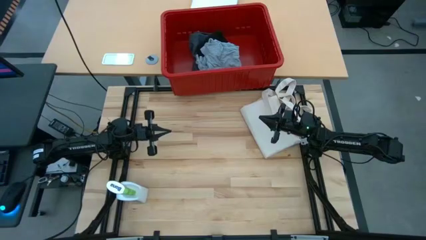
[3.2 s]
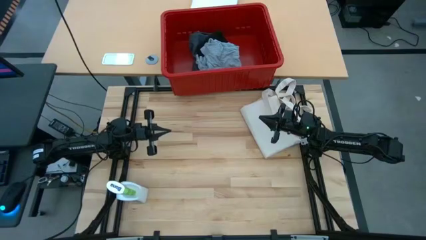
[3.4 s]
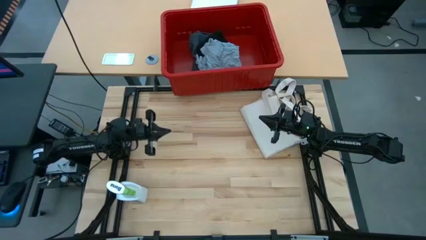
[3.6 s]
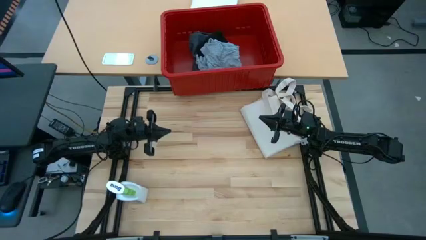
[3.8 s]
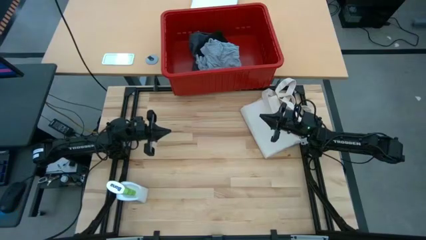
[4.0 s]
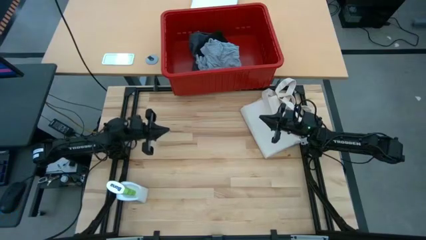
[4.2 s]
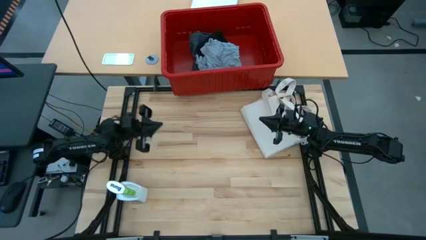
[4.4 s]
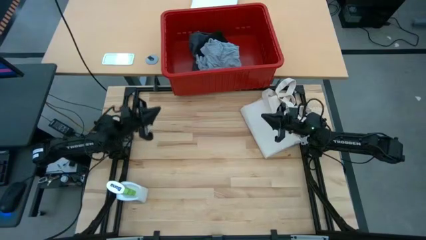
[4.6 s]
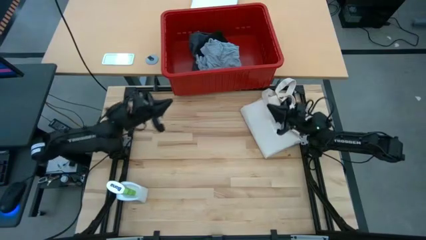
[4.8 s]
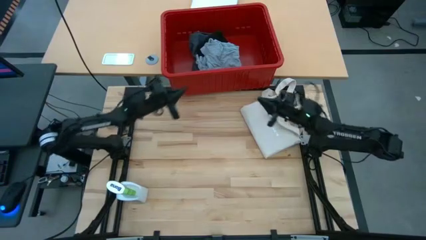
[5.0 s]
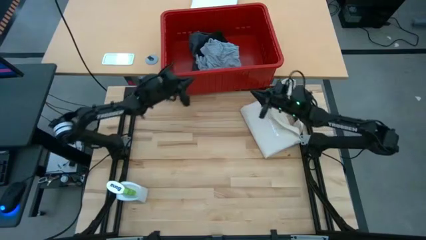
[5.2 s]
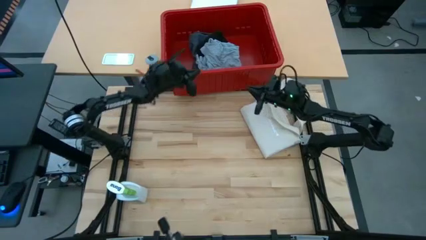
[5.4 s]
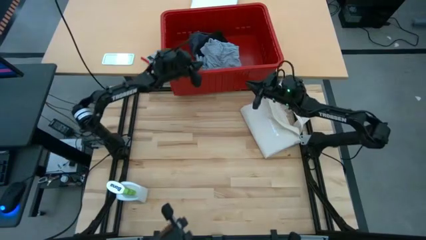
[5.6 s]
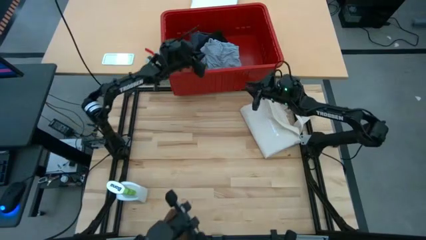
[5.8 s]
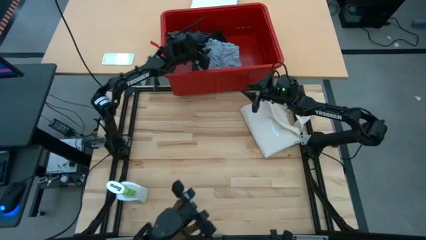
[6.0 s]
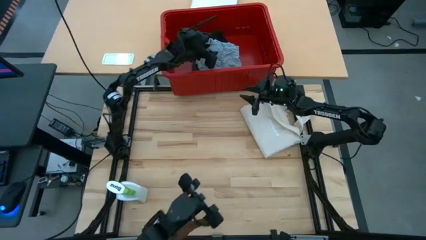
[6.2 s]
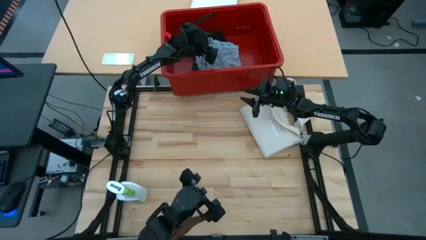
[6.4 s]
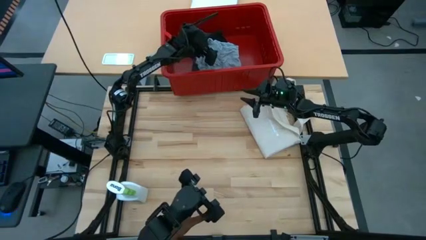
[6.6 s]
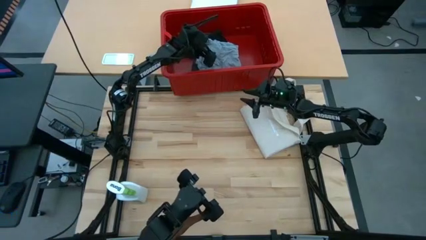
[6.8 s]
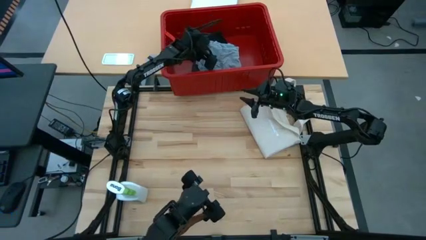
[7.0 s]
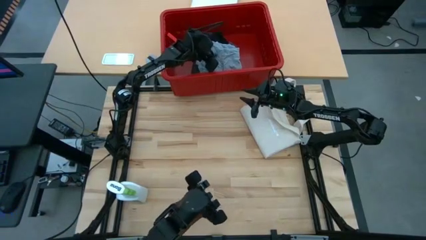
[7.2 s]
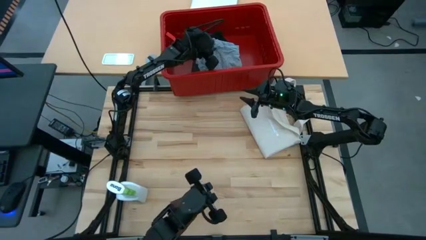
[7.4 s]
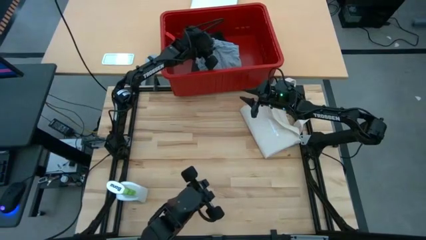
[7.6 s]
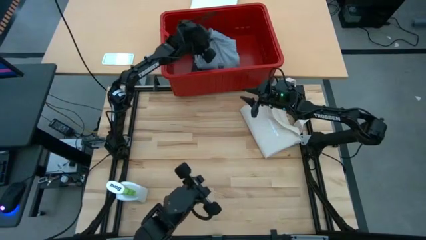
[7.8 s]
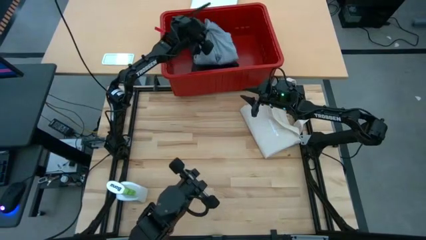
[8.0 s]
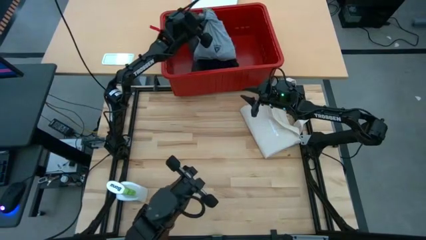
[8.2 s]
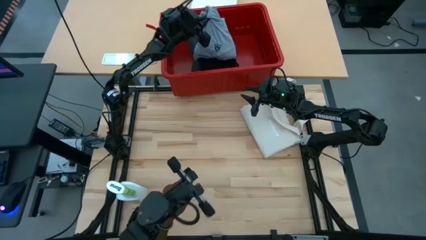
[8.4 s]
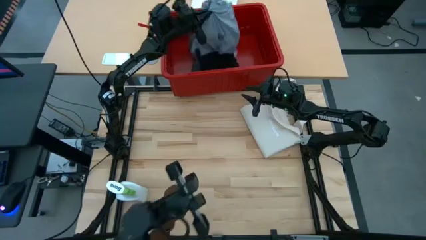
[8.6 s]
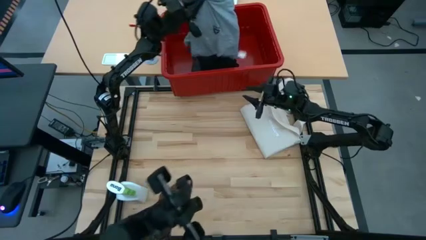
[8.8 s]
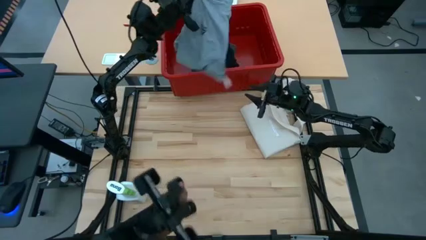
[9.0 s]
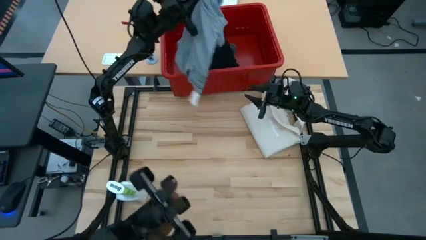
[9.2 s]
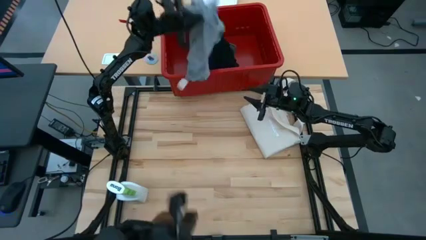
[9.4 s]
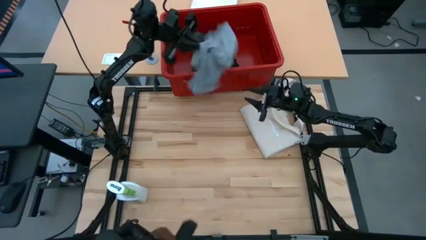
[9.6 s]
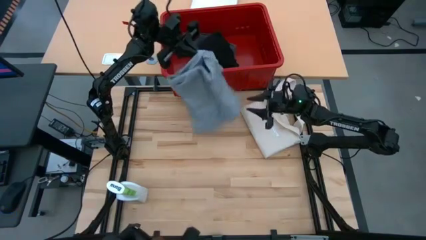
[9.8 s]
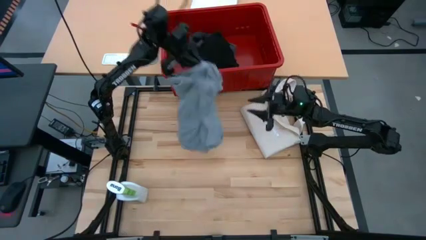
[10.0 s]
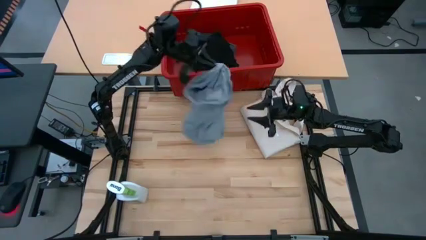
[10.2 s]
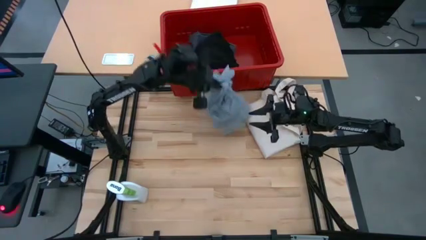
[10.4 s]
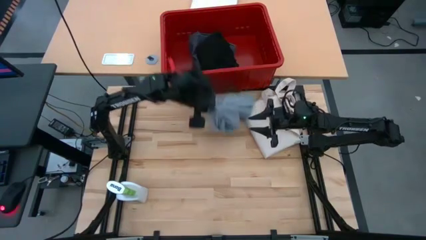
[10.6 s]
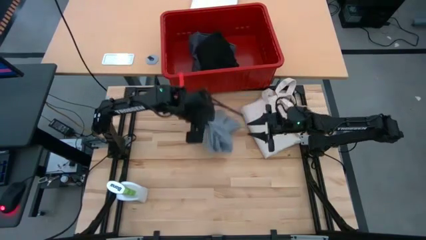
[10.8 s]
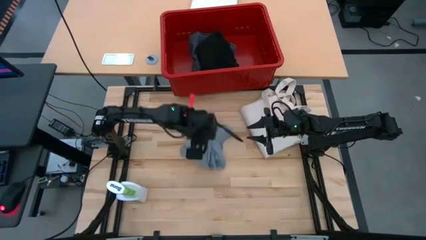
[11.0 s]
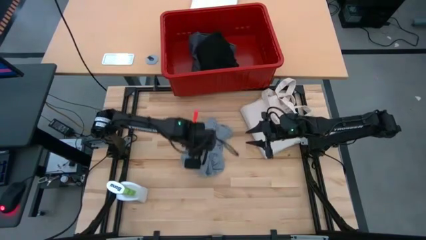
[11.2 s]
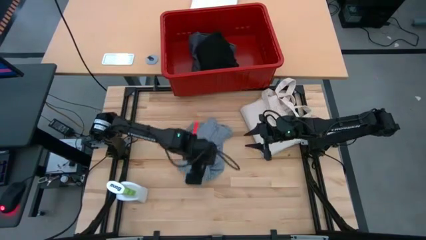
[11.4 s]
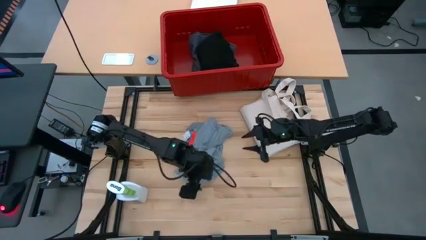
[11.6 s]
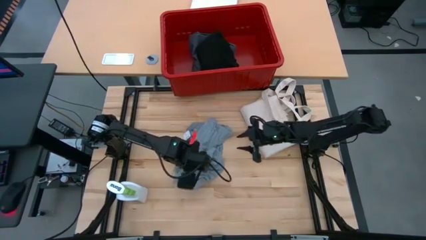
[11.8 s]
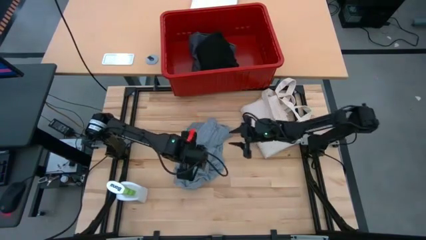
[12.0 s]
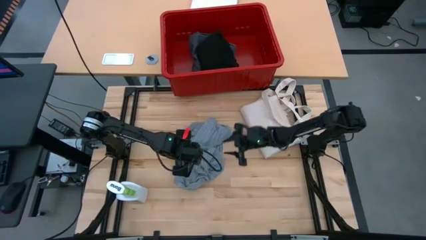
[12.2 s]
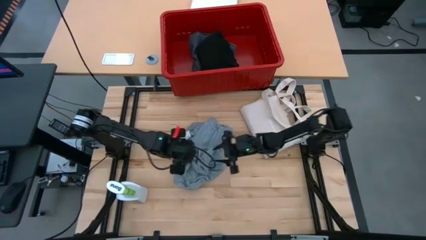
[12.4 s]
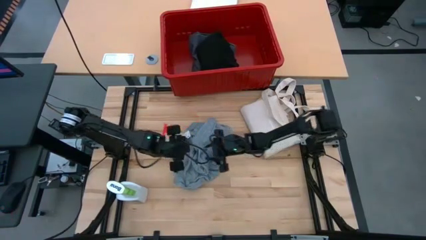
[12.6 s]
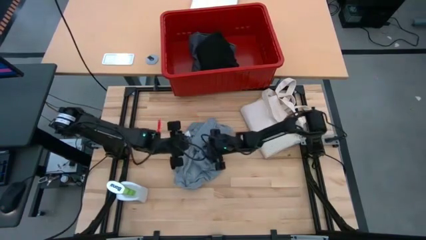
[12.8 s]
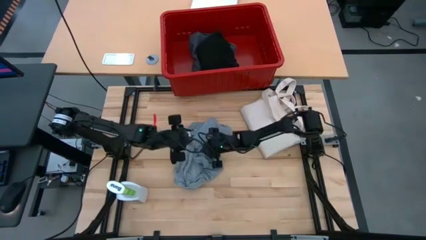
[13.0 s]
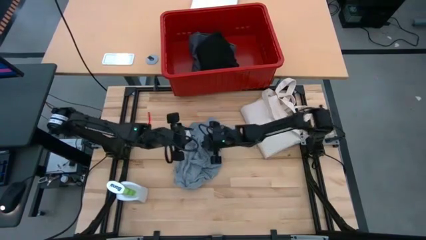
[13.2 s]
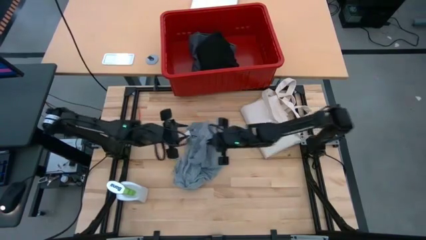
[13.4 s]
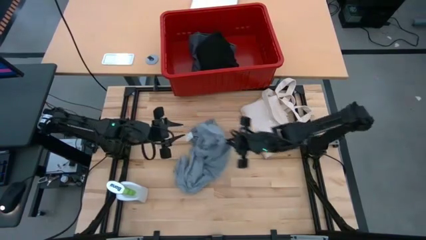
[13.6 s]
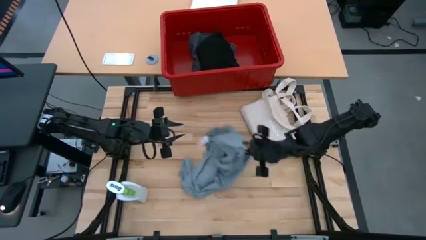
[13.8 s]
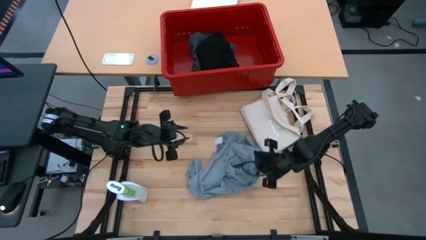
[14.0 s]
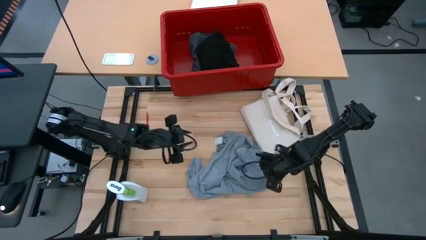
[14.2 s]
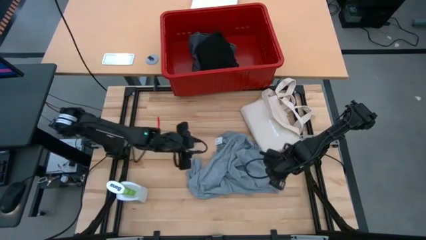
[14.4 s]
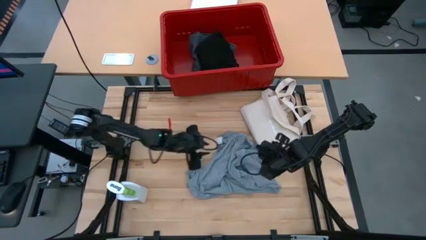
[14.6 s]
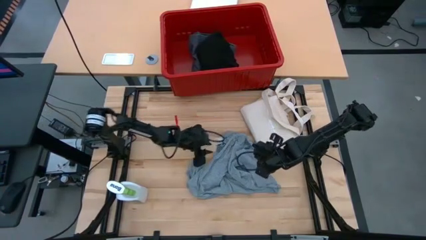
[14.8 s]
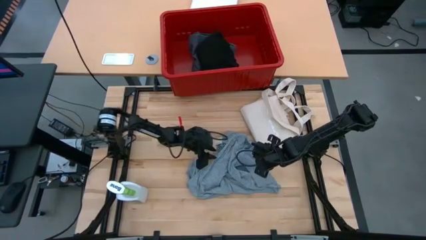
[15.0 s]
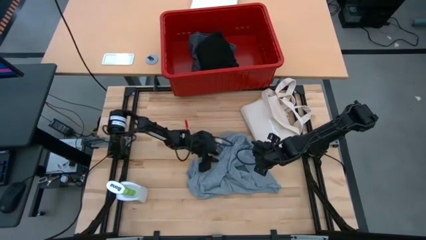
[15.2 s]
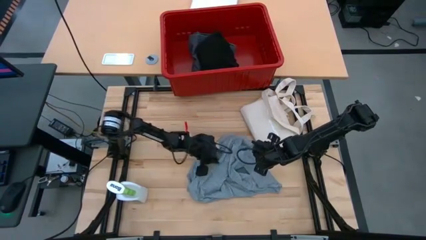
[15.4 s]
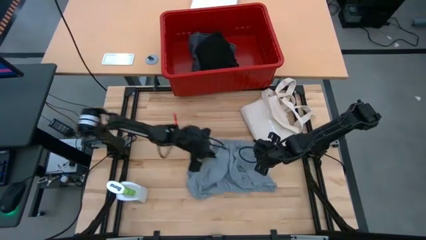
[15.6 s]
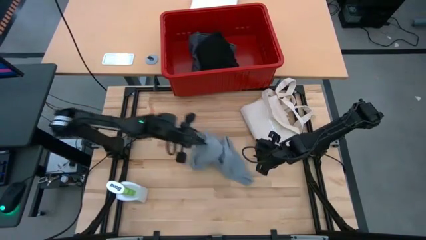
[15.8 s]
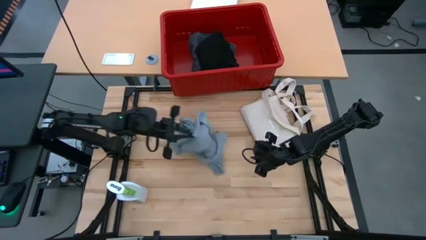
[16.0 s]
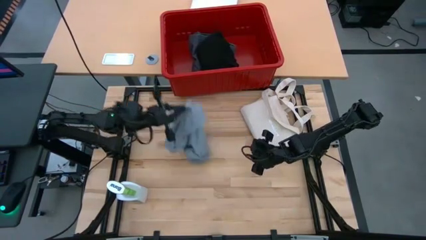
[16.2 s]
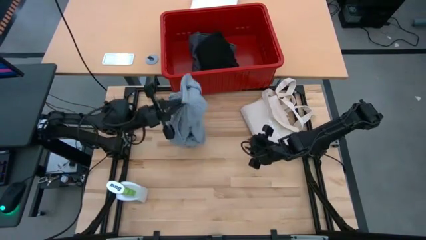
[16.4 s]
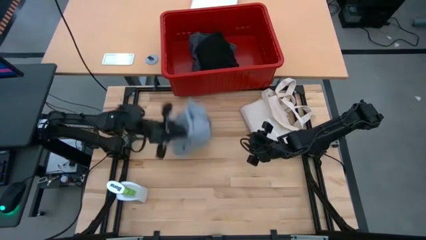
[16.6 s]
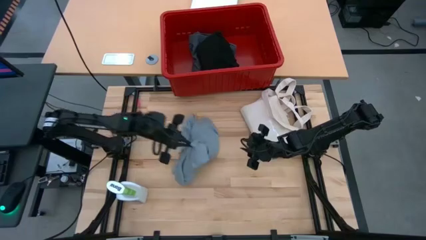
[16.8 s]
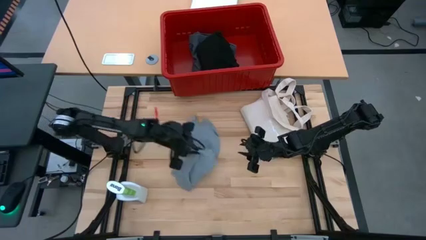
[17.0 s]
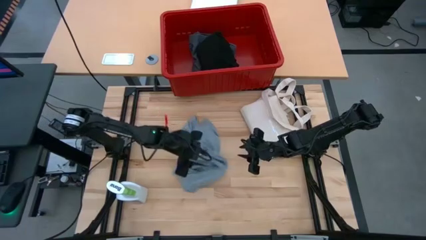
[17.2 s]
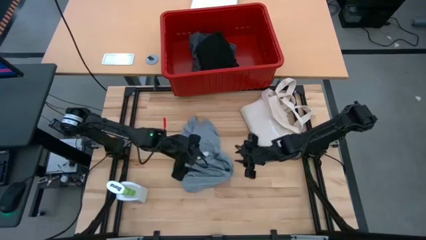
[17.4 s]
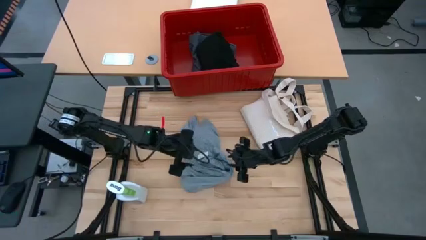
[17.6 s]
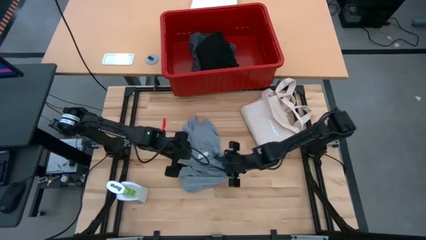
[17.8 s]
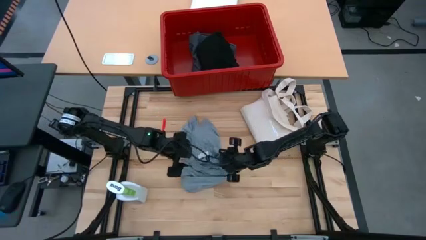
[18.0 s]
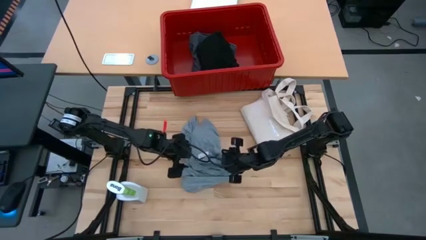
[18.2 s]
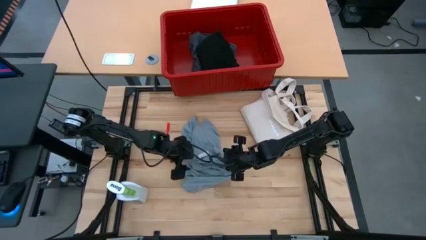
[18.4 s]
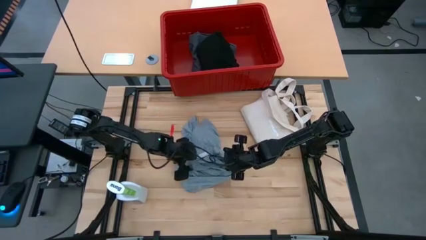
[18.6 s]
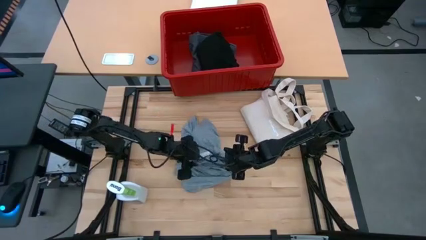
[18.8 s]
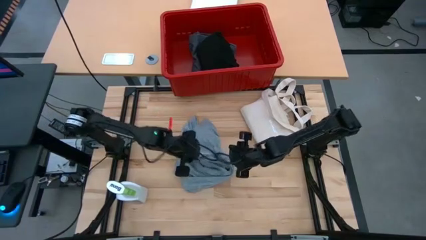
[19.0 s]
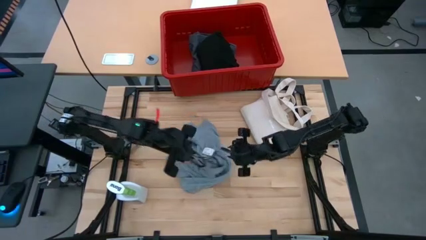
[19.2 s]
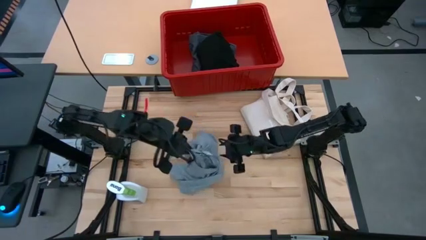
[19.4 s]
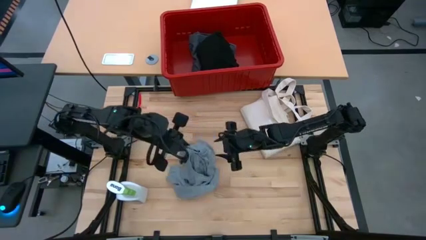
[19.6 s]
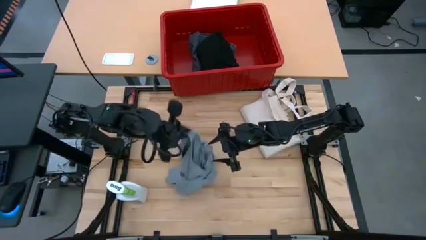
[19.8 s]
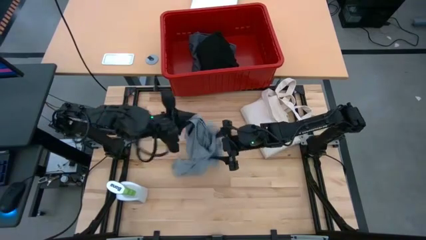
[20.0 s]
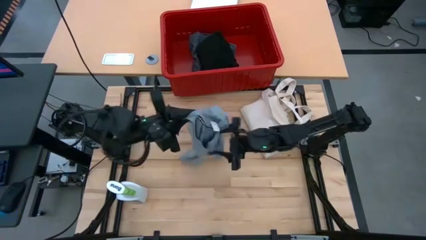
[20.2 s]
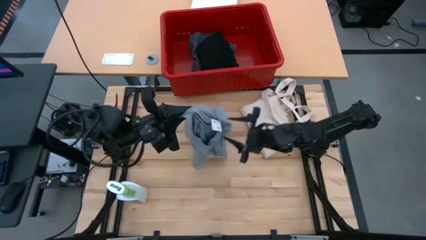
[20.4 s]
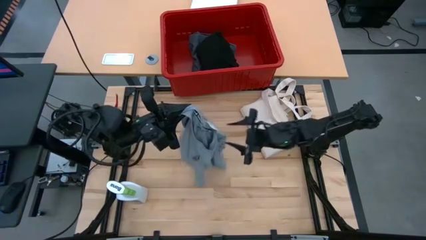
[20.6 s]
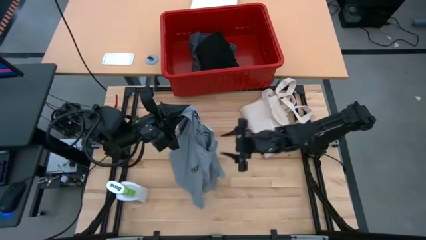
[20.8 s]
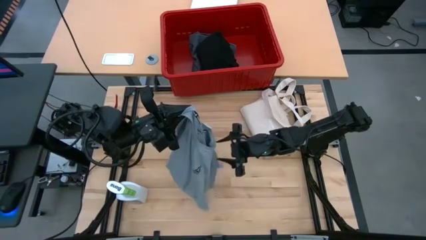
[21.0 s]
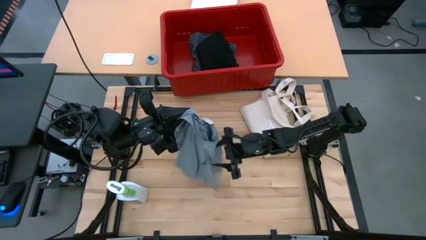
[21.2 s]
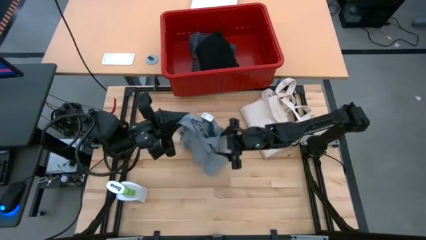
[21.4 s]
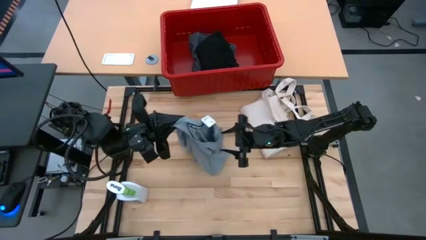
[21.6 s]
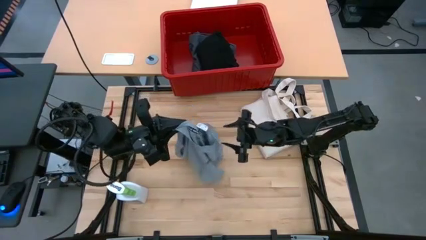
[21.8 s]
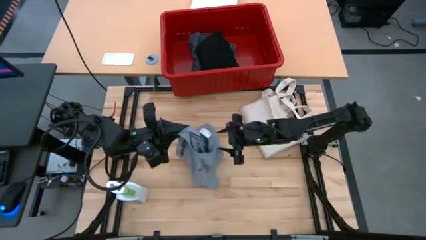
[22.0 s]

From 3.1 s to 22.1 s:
Task: Fold Laundry from Bin
Fold the gray shirt
